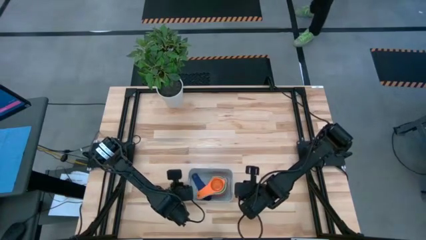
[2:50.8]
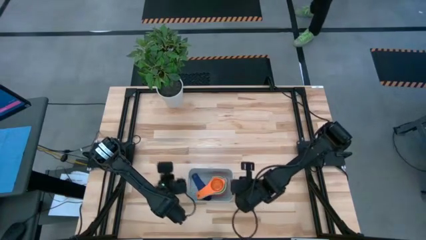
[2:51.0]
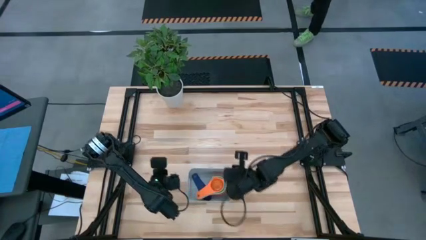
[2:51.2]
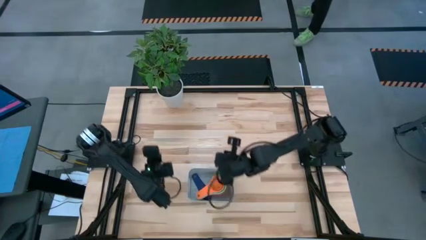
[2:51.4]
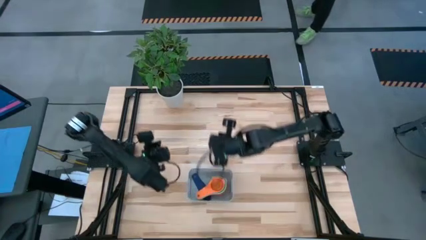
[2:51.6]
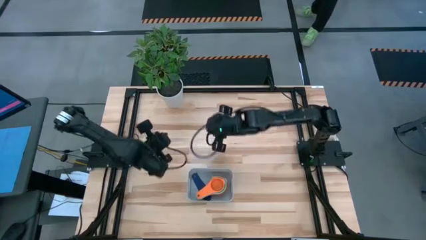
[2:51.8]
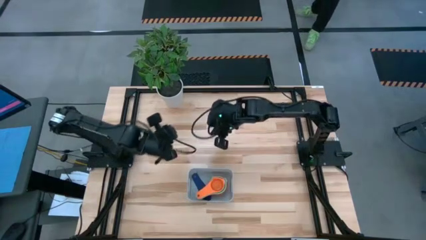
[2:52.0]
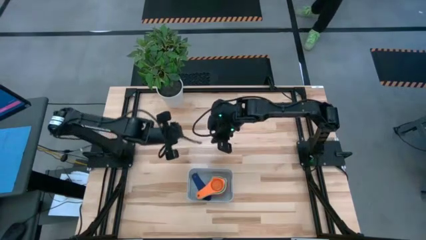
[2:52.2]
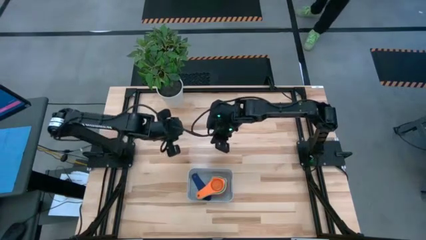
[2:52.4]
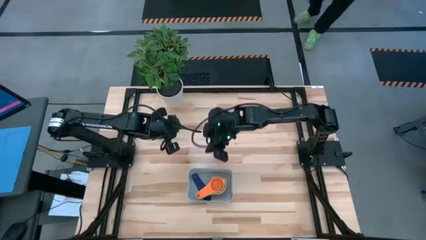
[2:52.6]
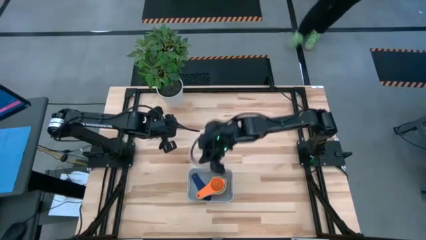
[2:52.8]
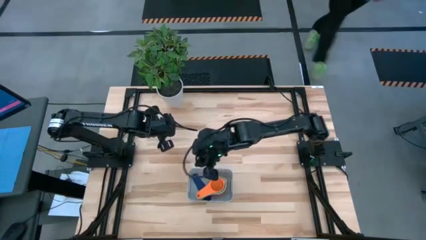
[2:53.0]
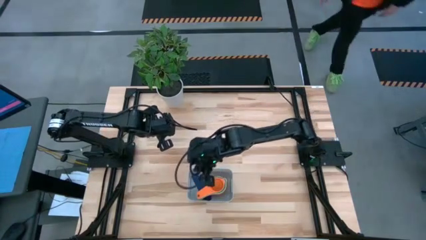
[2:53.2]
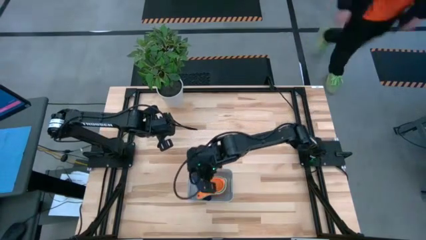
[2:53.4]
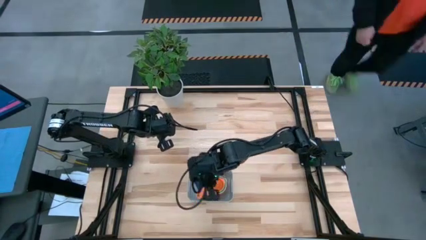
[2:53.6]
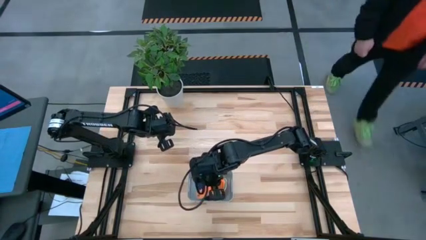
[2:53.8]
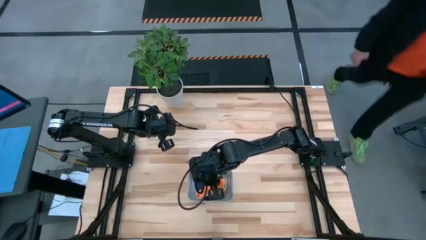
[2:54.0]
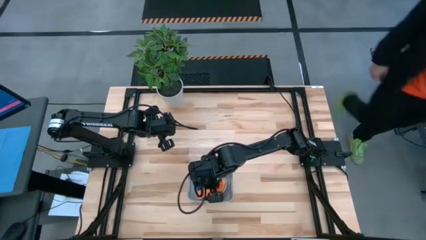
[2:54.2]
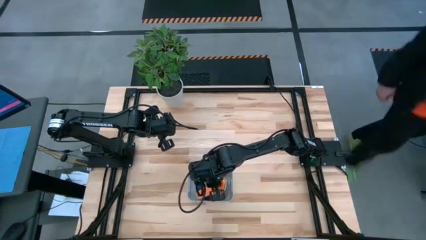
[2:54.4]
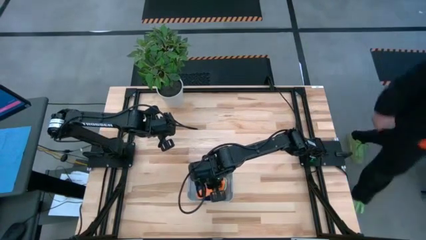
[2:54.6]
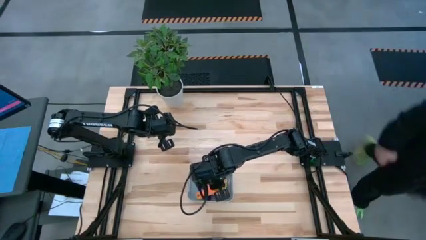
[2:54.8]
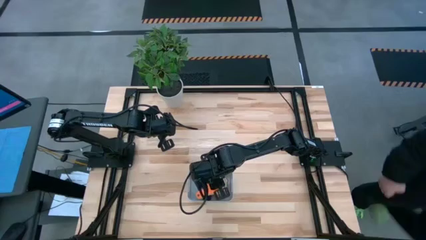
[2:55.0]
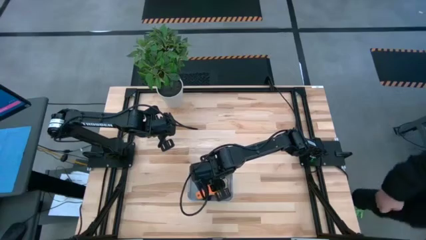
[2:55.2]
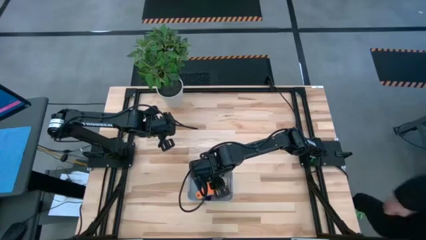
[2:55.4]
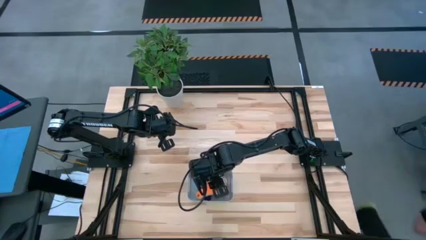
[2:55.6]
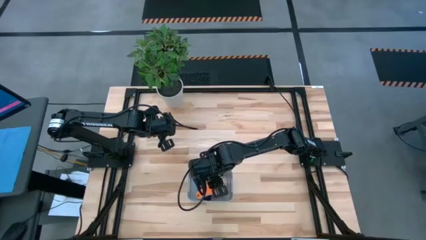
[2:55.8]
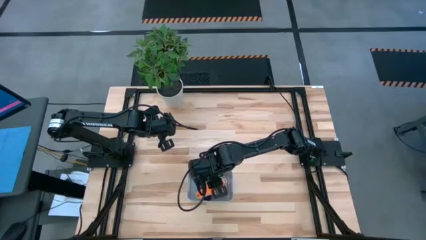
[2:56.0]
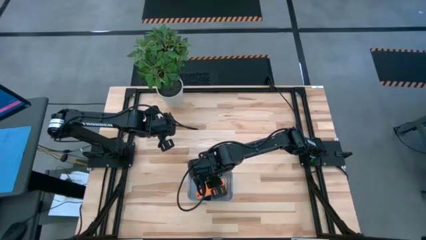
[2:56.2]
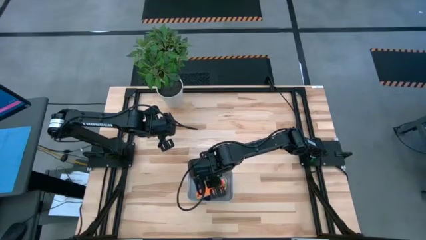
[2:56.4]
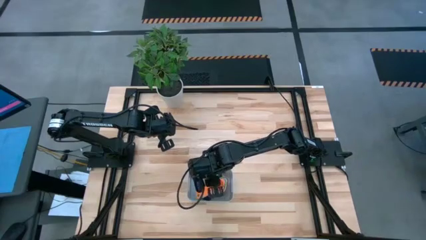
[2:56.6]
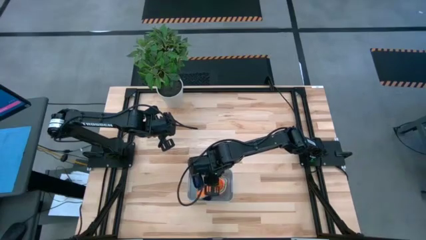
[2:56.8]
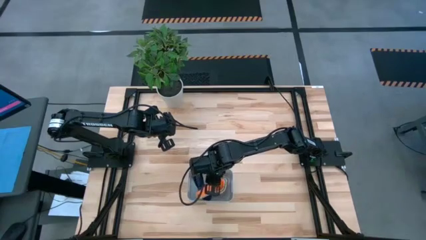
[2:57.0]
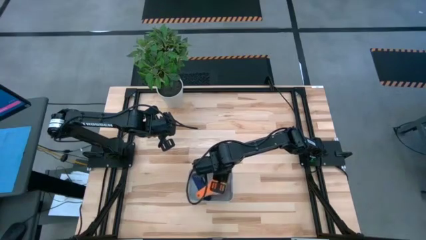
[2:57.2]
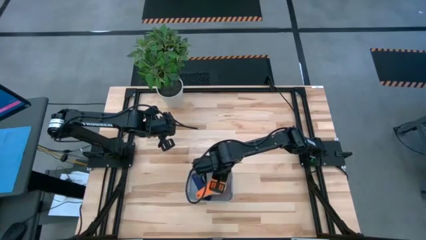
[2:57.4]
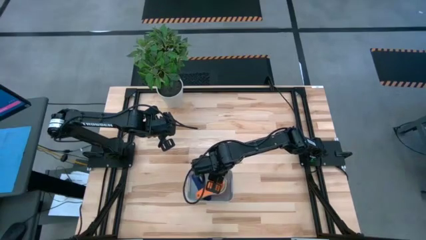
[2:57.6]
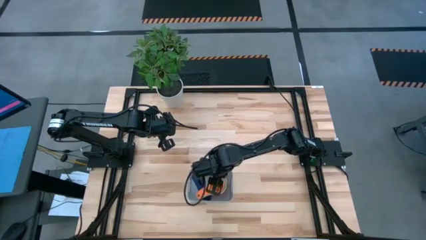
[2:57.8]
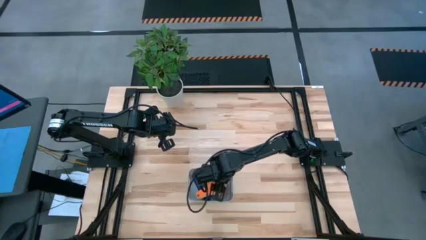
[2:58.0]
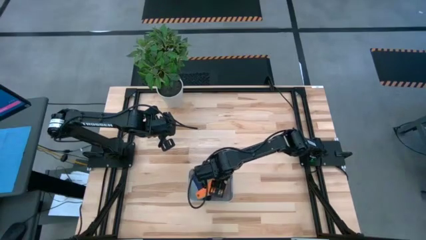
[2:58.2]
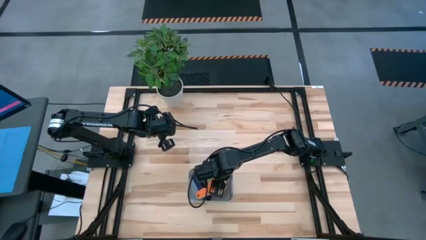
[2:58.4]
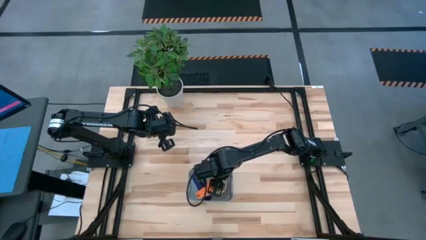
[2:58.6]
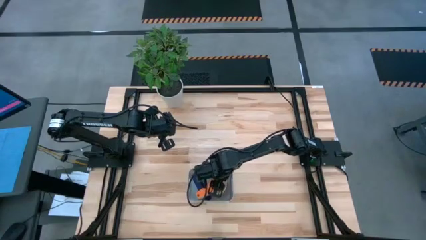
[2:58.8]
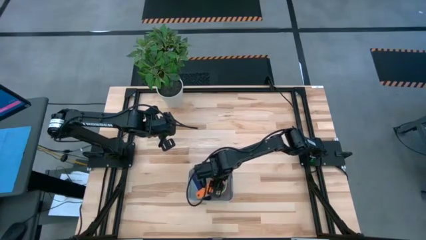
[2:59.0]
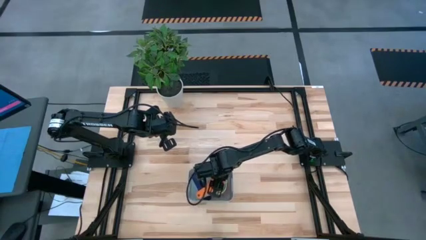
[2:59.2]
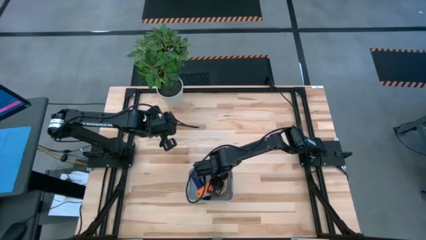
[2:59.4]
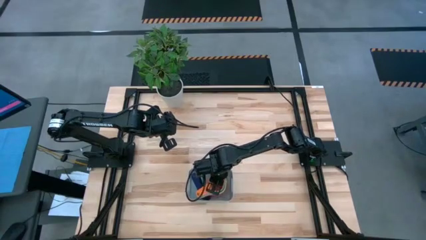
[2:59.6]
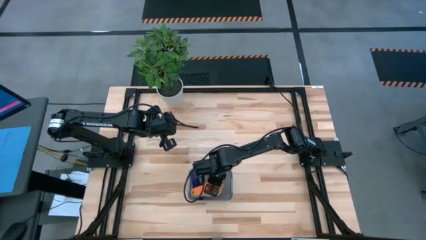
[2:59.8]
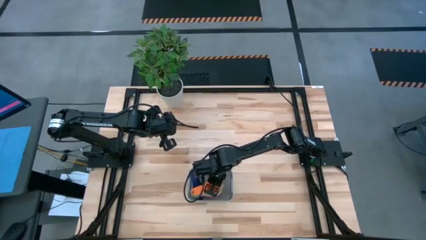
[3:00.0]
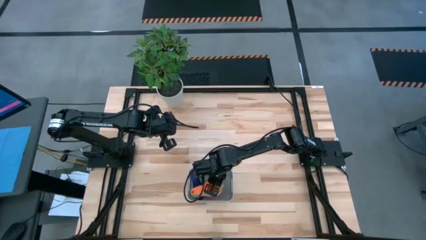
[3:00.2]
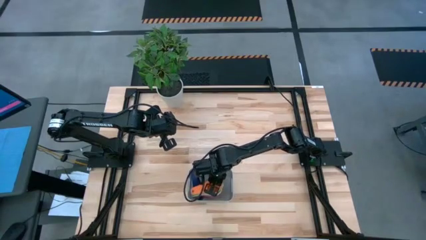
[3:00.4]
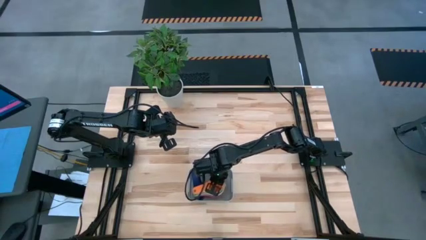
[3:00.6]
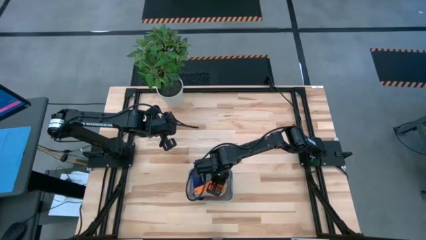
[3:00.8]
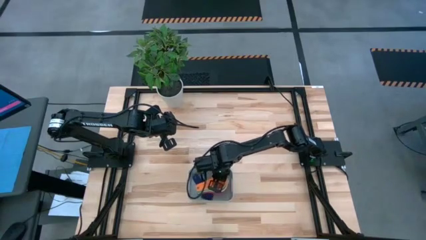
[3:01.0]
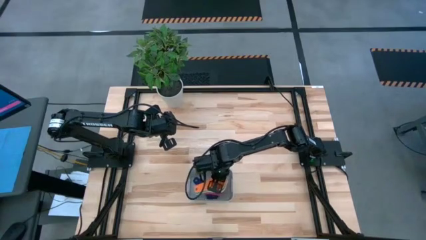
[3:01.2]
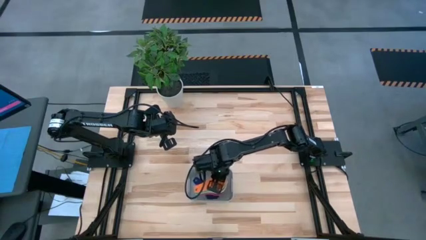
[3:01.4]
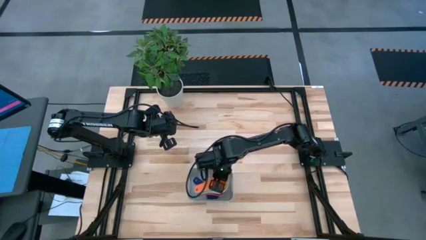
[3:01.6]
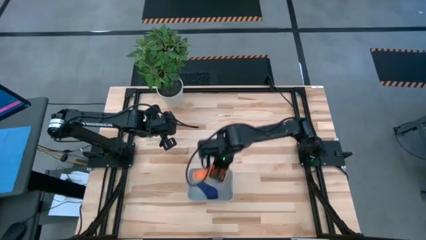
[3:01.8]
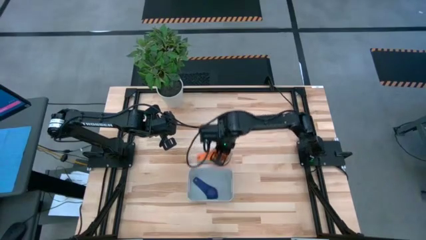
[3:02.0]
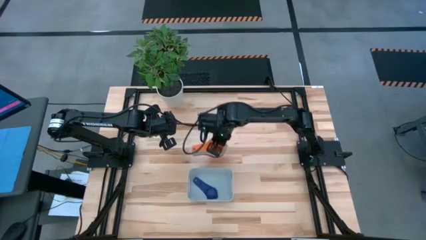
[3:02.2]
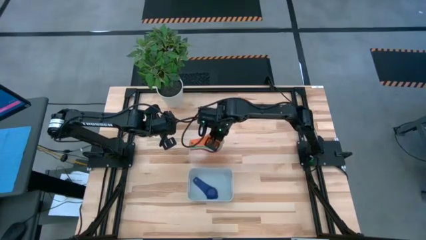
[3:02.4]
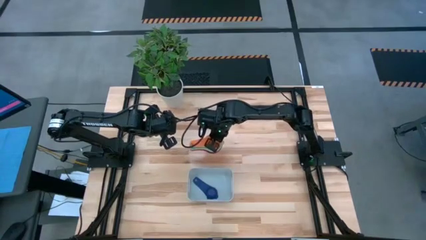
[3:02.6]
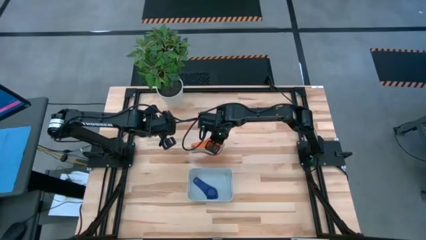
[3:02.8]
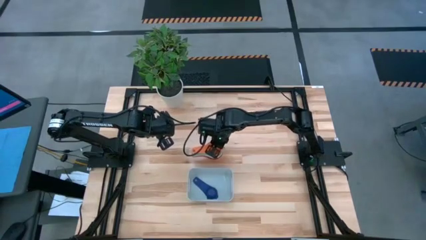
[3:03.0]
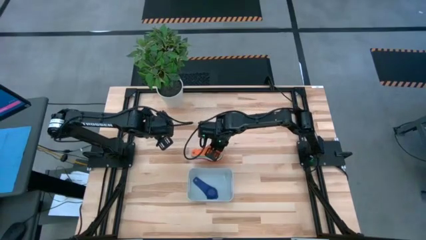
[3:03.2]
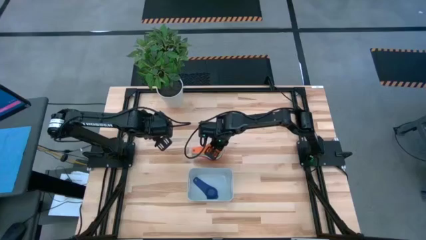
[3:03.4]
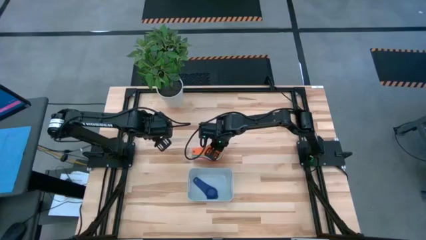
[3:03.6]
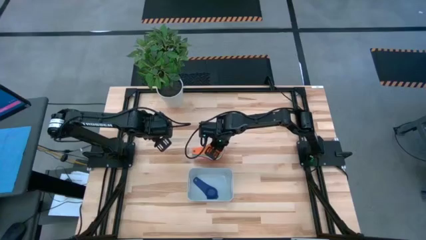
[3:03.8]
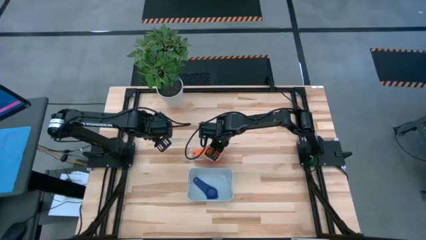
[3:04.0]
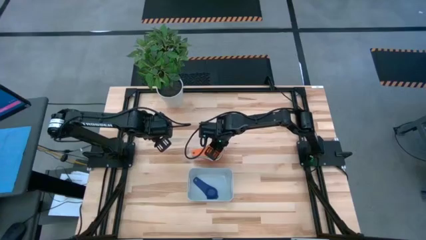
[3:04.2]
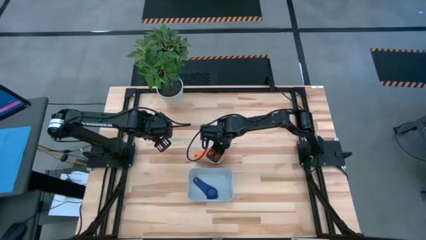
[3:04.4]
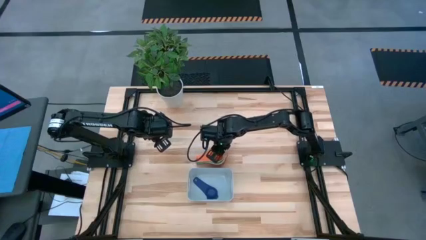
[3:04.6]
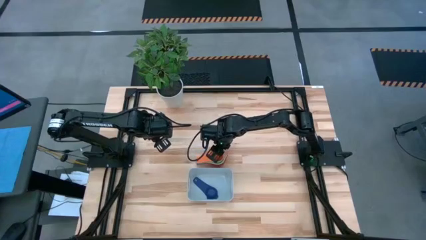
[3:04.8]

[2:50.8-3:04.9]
Task: Nest measuring cups in basket
Remove the stacked measuring cups from the gray bin

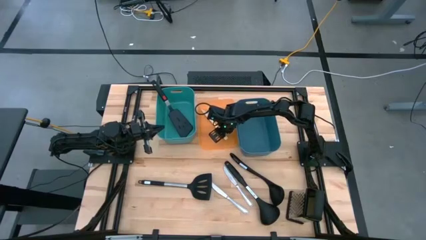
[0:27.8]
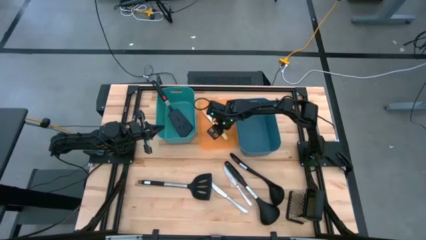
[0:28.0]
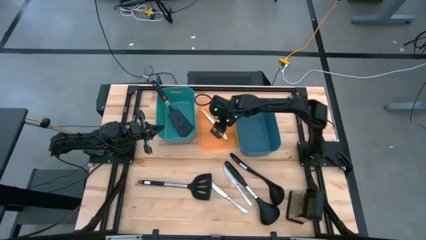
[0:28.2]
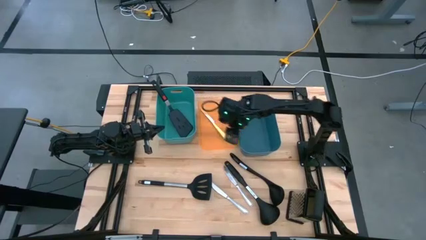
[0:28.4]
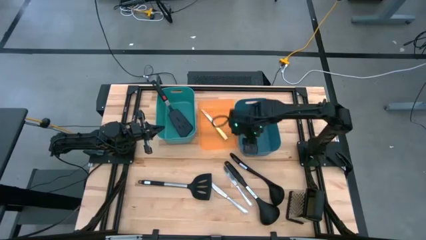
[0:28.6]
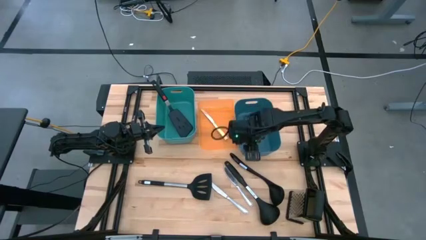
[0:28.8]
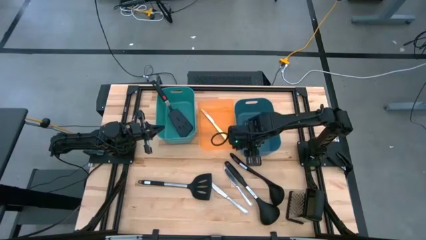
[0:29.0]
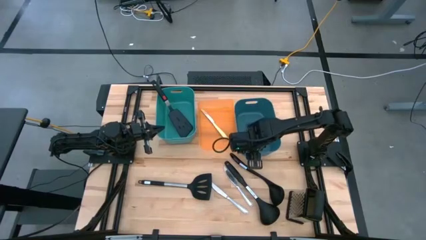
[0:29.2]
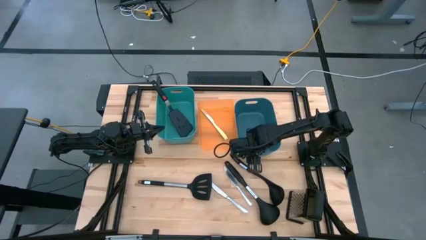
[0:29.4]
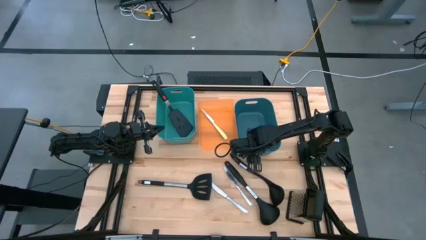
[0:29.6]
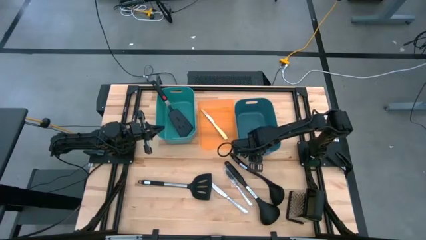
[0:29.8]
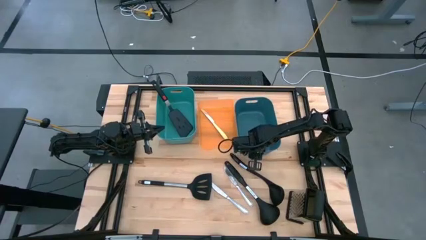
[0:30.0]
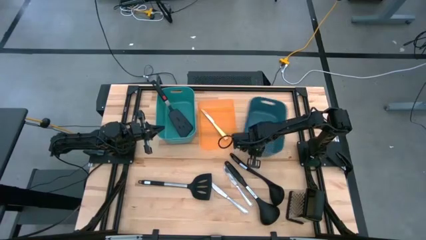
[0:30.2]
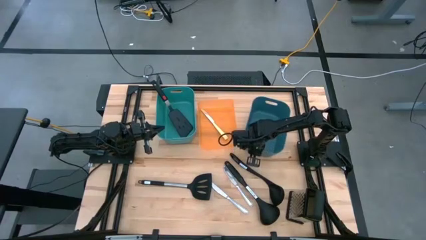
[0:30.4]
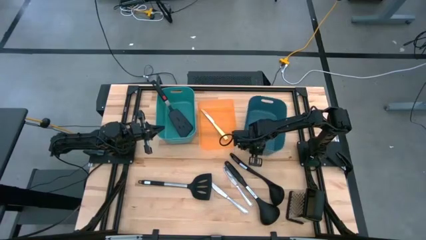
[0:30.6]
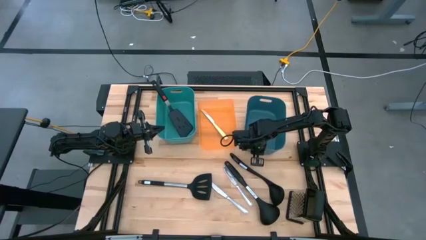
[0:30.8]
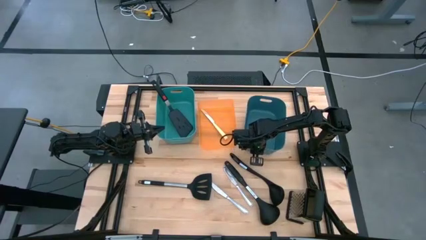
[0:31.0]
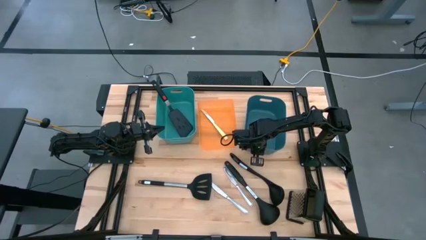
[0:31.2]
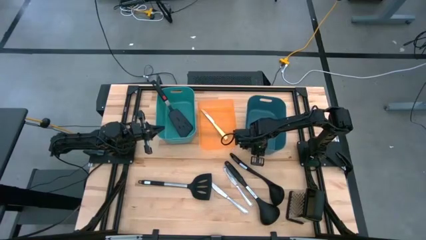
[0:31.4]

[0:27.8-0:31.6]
Task: Pick & Place Kitchen Items
Adjust the dark blue bin
